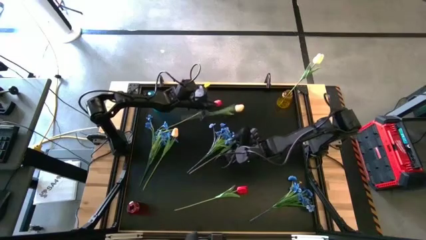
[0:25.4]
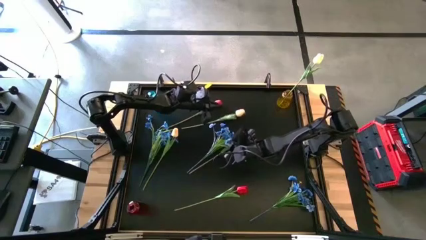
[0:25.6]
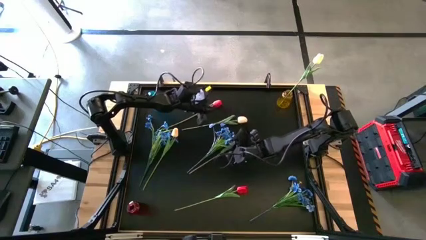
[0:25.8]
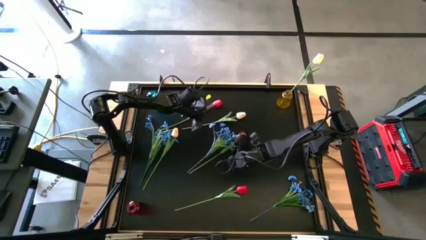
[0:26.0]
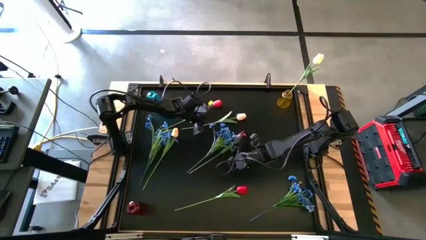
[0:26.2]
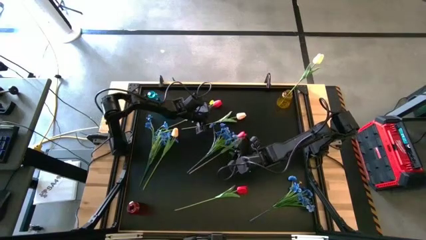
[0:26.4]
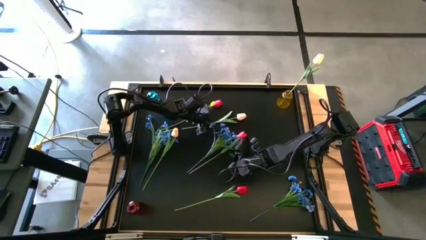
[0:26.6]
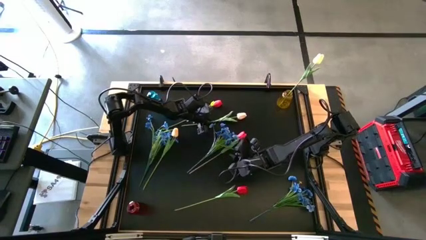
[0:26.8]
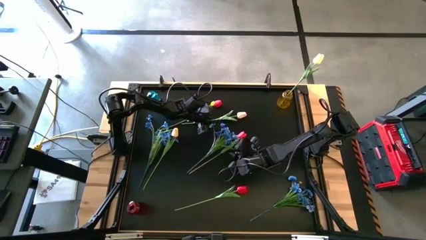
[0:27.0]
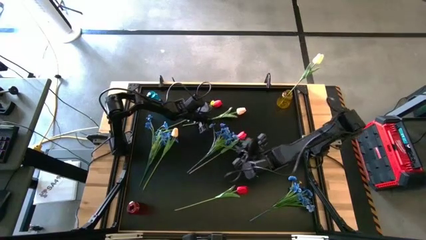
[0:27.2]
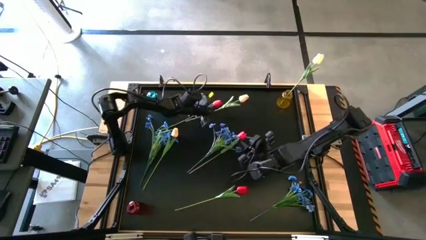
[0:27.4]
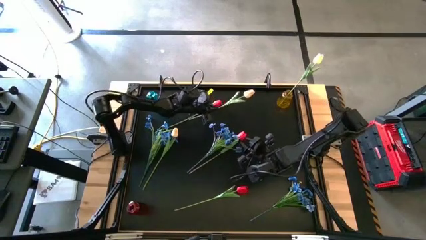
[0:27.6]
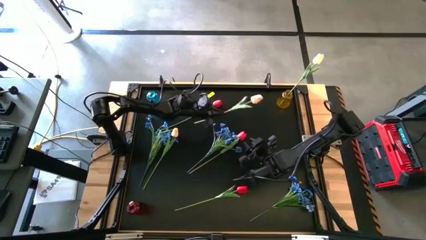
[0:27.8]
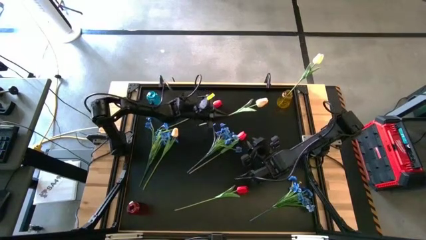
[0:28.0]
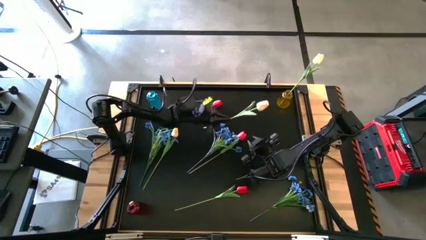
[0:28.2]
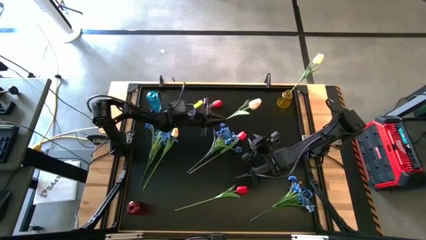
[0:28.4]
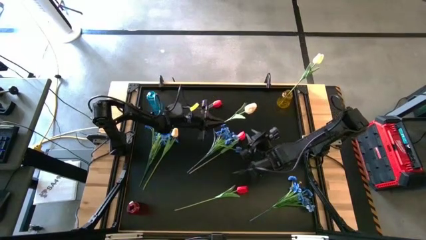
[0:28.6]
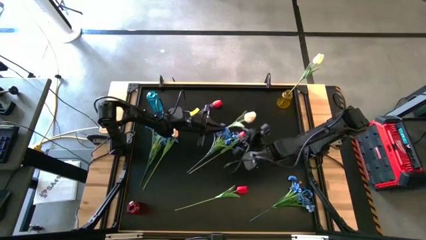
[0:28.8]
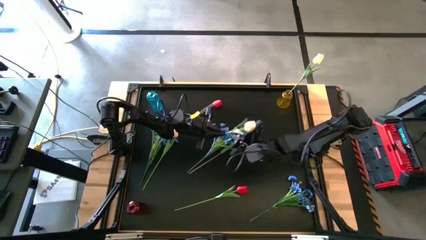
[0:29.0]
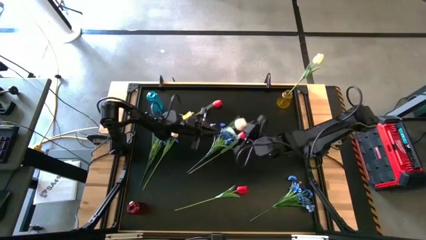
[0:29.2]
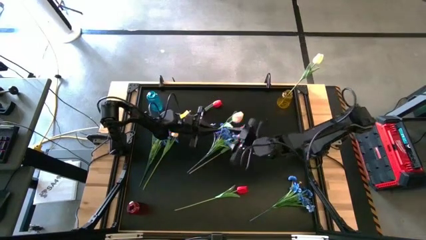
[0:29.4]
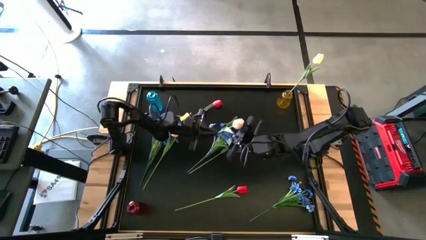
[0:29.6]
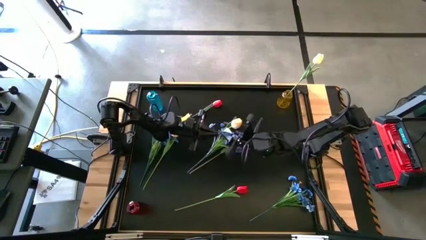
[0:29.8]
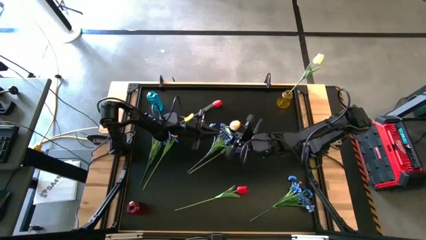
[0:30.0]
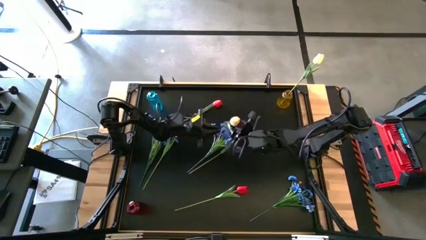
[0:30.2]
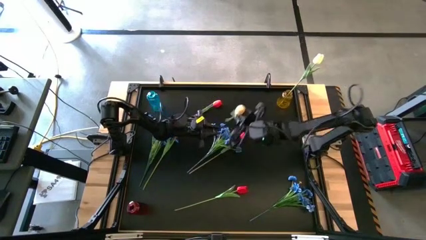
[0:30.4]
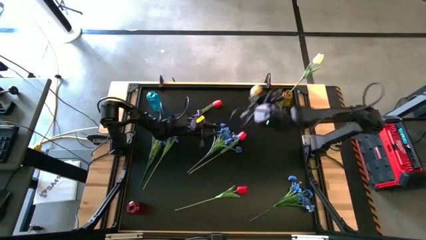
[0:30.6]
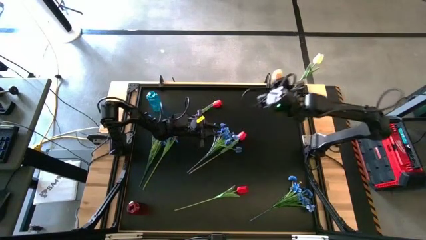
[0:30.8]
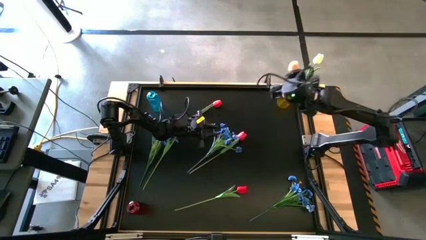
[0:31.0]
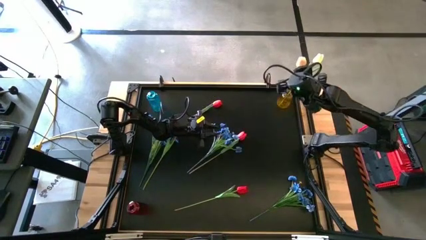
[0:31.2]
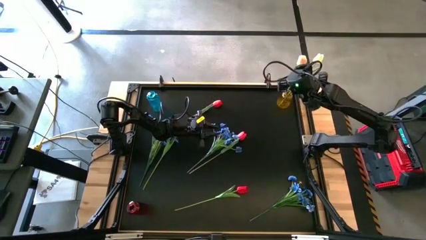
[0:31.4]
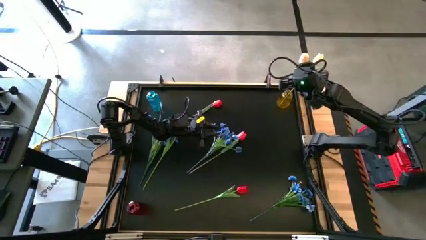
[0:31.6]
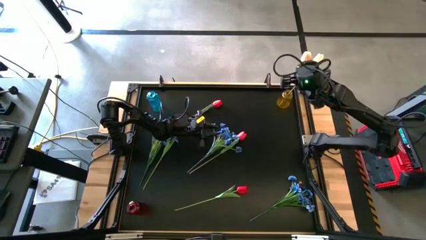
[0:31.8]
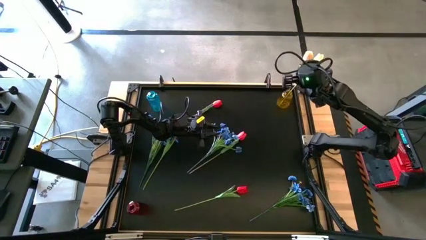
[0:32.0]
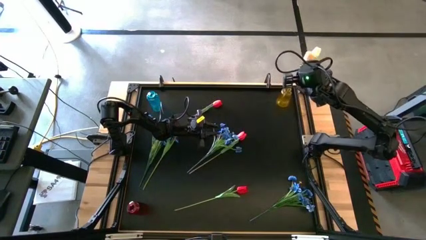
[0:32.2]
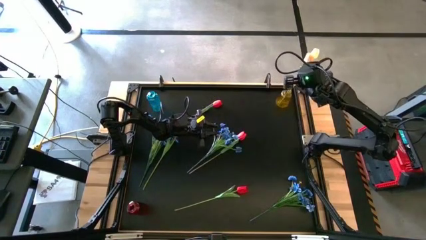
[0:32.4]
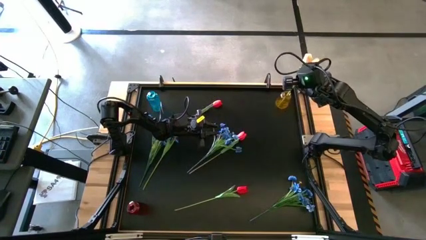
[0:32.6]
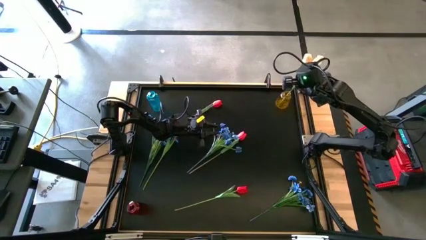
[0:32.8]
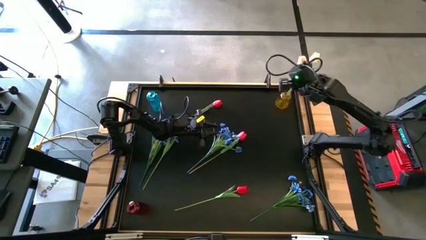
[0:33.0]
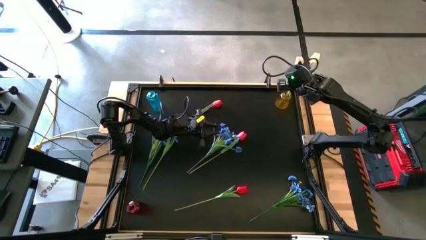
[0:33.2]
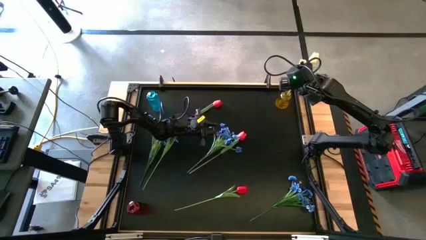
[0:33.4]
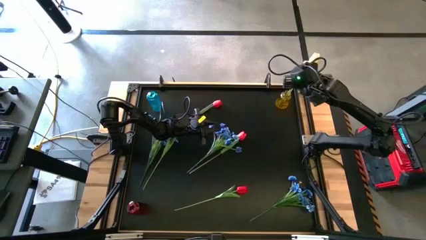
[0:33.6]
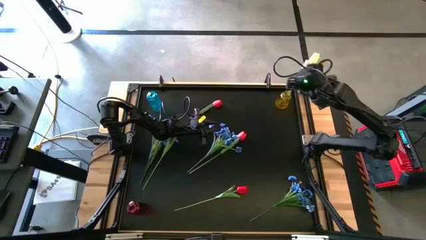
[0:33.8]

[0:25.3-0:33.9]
Task: Sort flowers into vase by color
Put the top yellow flower into the yellow vase

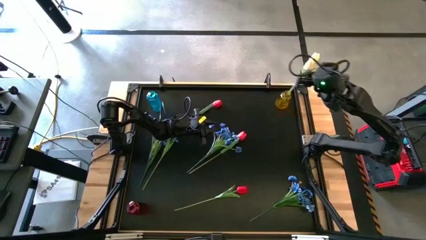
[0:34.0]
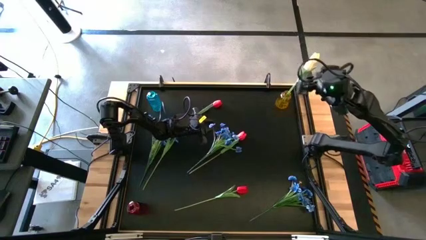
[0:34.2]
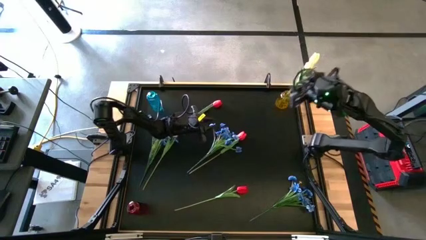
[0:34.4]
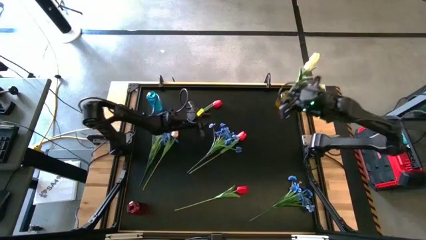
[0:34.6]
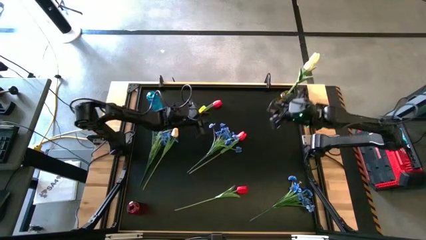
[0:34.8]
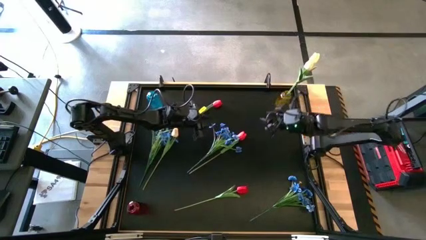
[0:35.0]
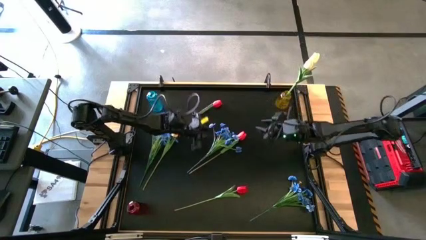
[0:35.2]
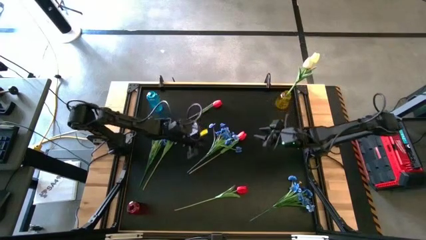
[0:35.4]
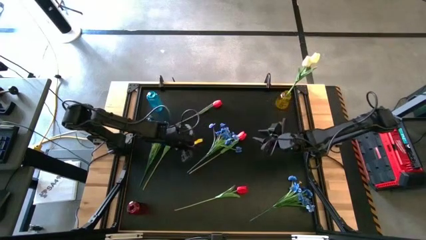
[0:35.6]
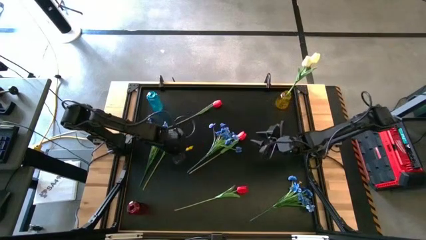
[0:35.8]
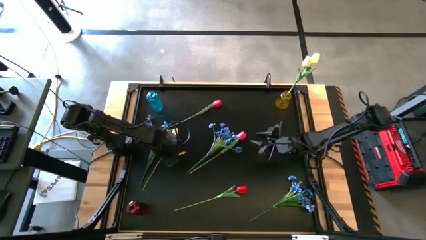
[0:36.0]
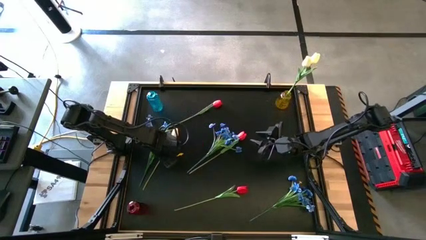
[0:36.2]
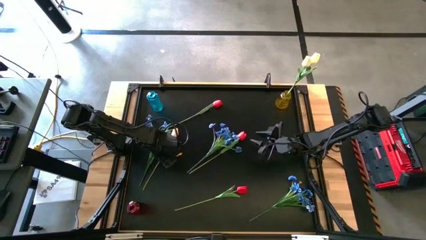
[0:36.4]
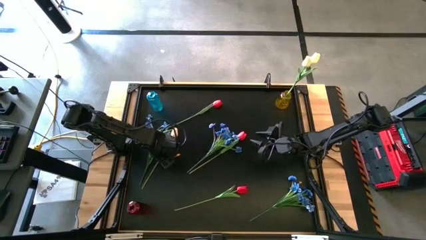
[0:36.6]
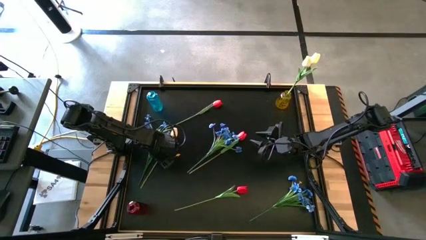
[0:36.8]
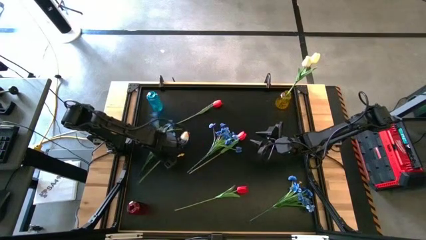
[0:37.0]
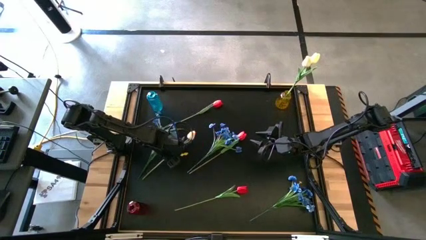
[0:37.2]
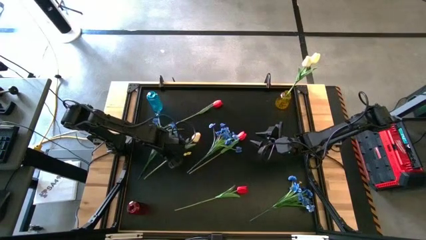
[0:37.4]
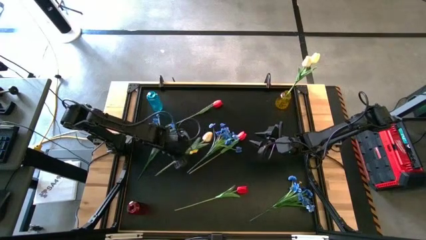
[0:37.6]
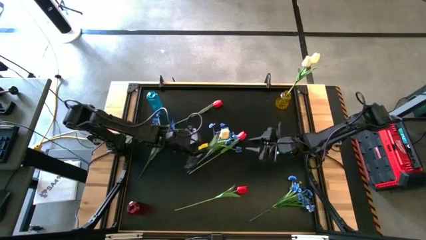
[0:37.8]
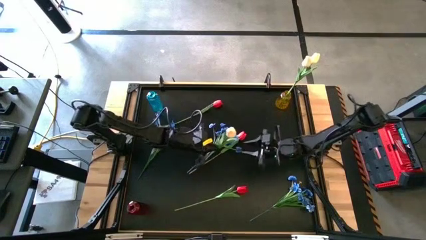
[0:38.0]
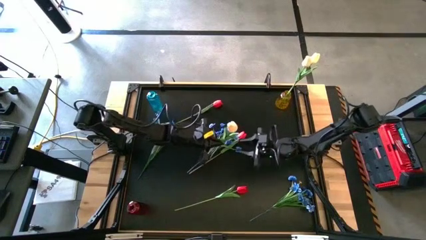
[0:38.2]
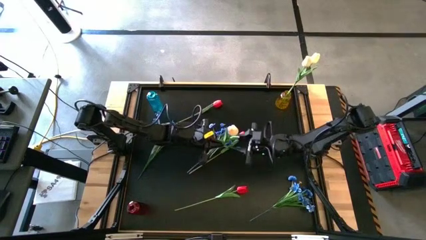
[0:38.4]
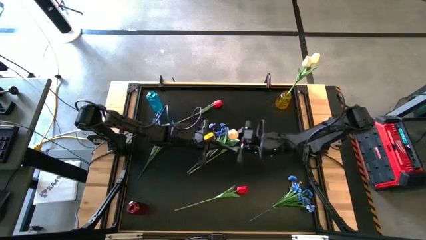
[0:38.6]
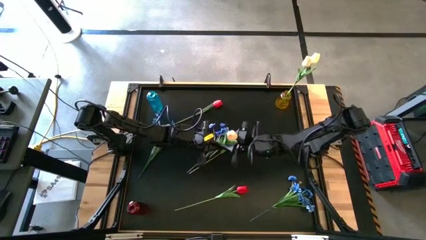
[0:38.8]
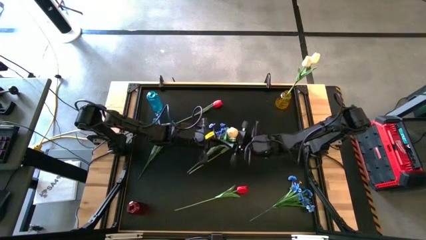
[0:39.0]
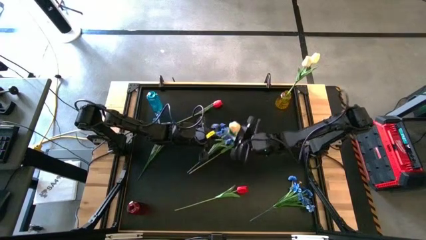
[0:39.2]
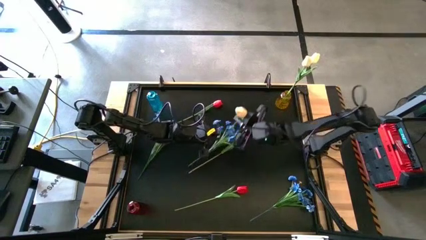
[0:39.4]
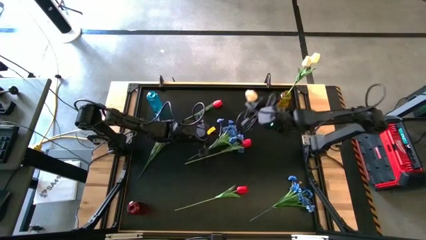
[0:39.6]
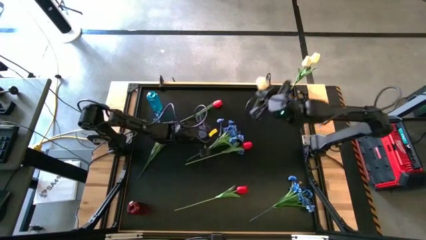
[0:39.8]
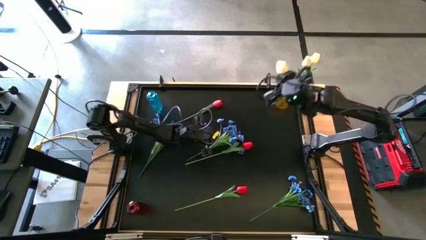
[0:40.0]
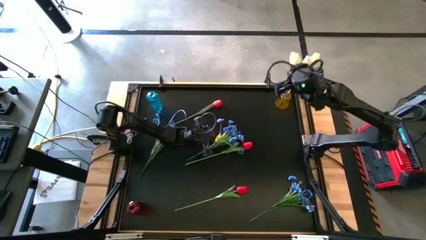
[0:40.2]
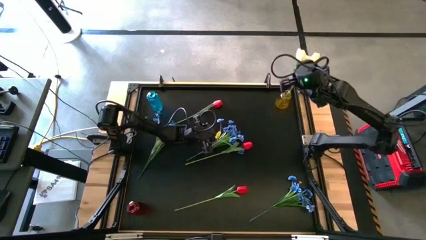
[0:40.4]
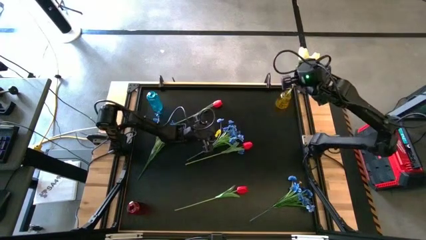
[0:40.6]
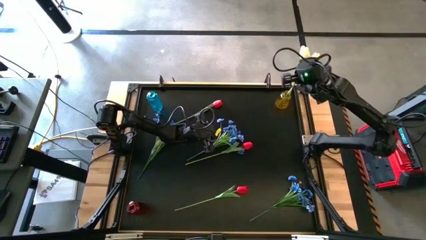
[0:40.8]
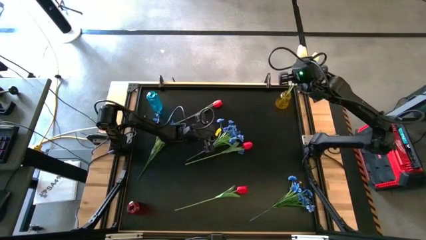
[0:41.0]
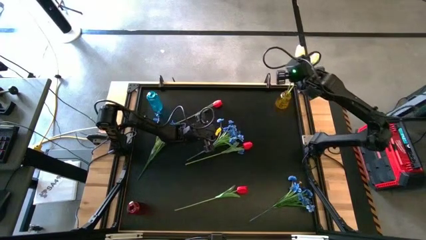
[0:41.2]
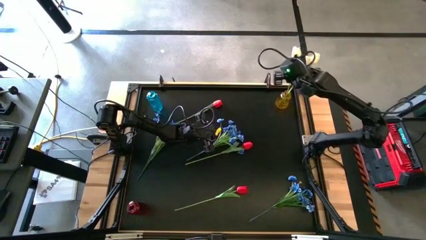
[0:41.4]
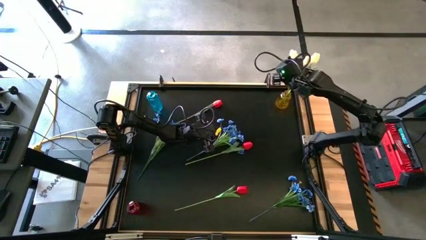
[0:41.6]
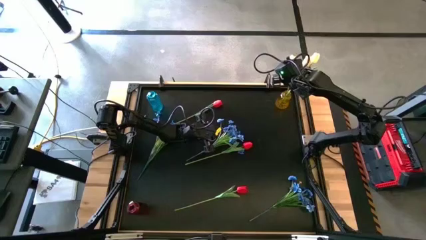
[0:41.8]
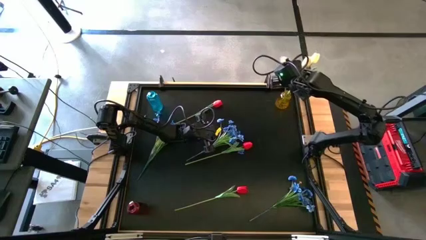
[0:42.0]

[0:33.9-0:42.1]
Put the yellow flower into the yellow vase
